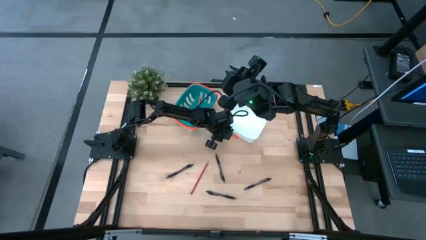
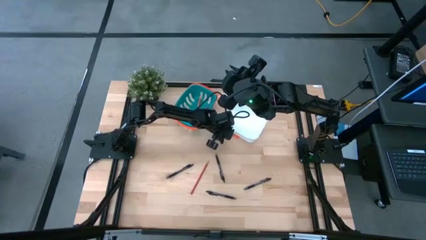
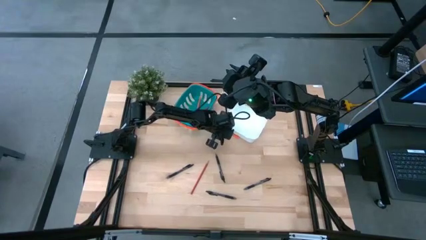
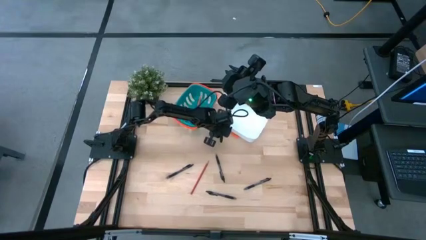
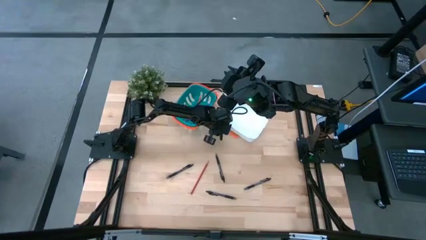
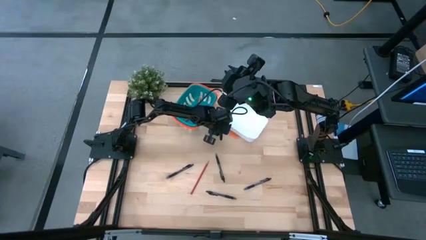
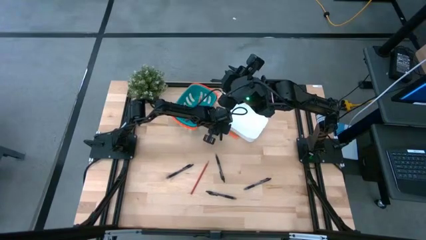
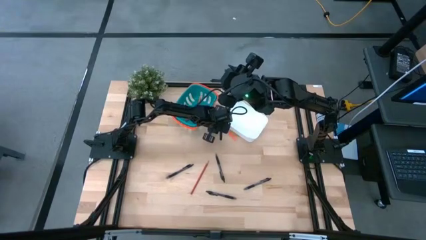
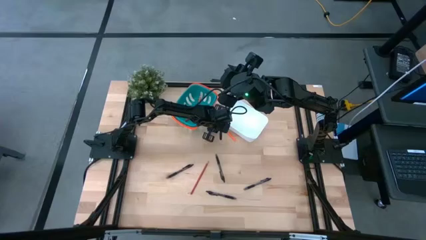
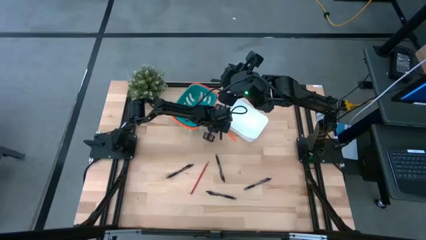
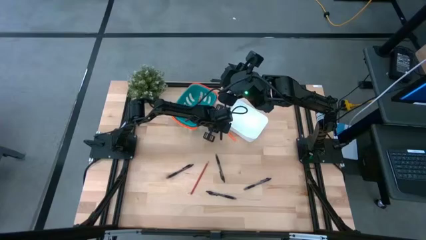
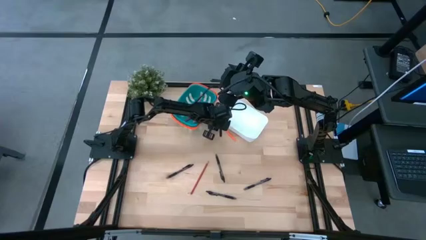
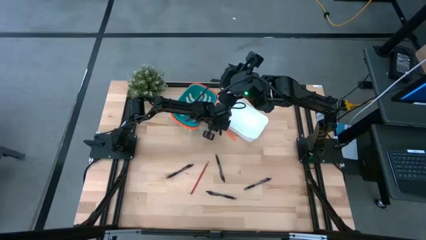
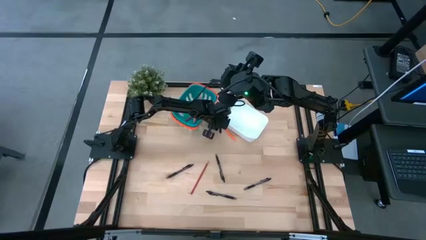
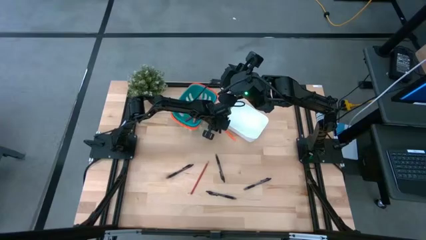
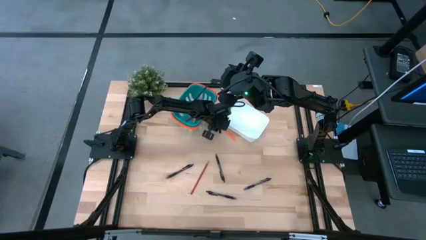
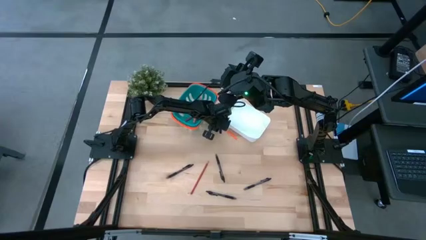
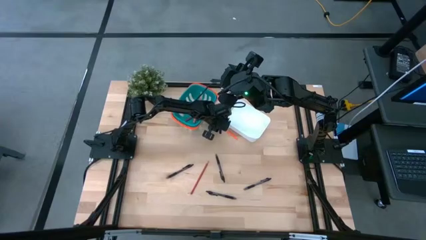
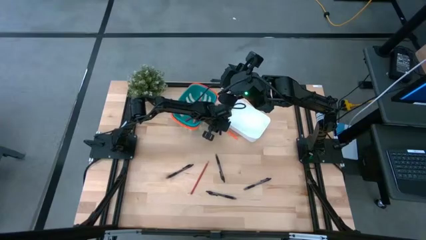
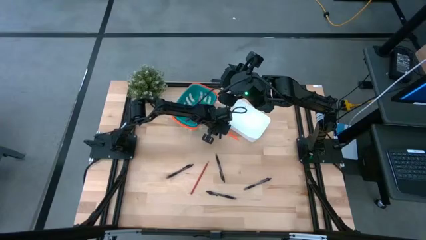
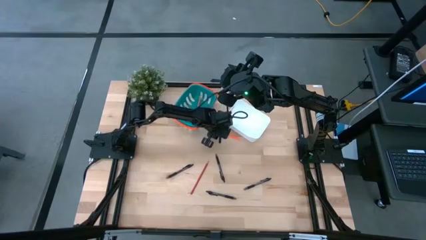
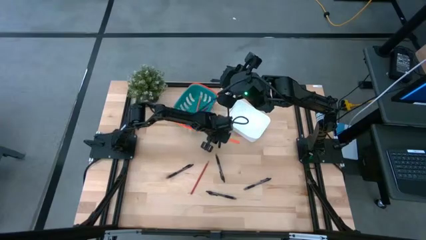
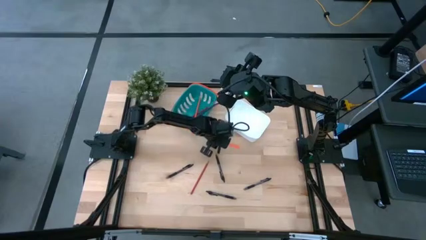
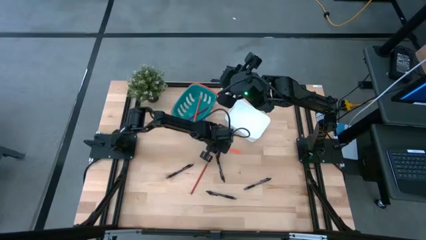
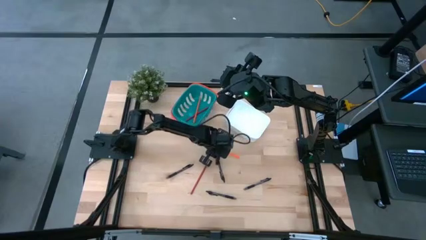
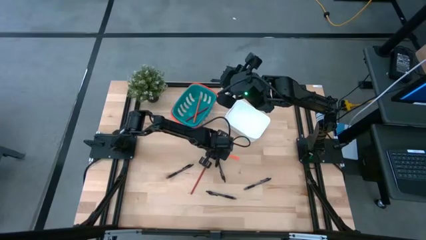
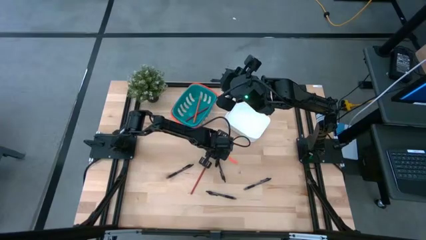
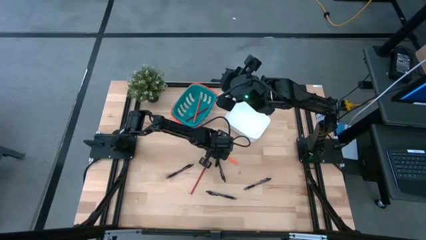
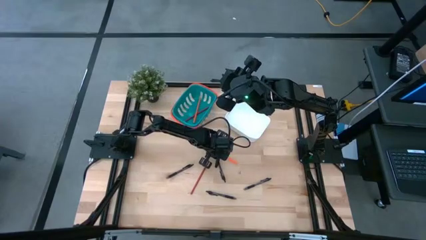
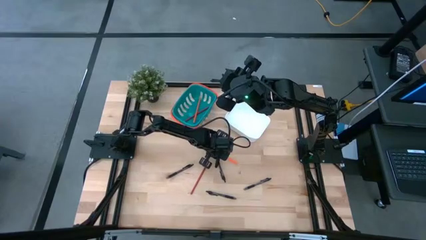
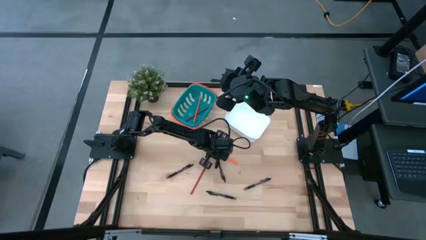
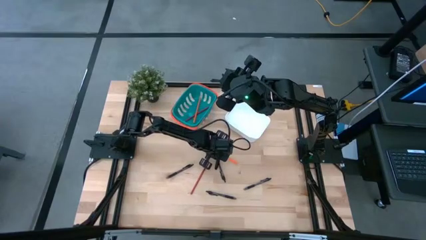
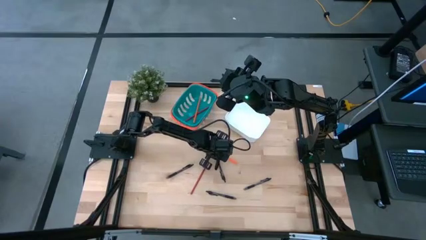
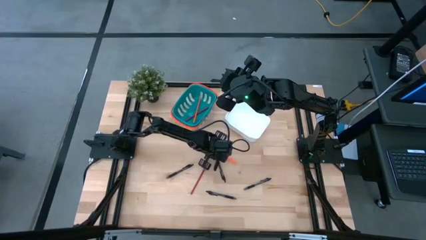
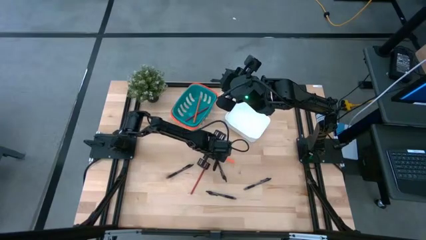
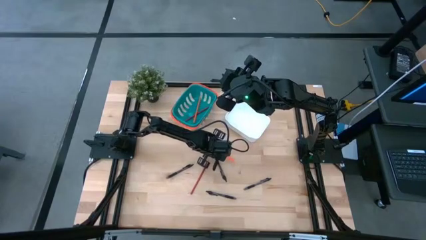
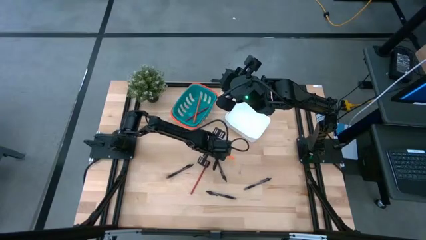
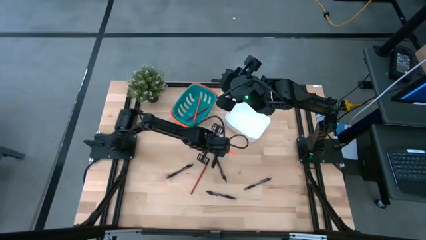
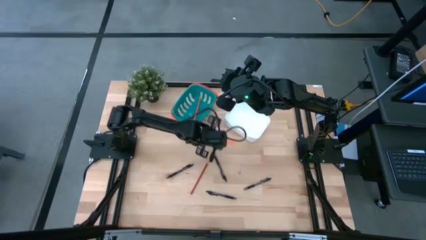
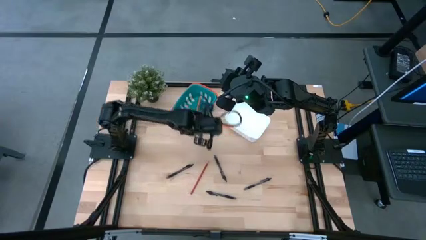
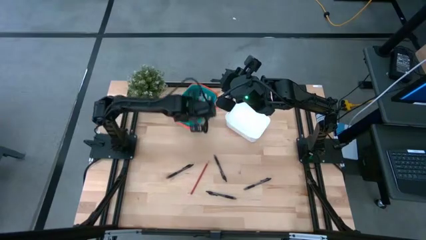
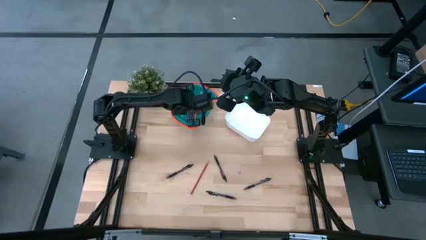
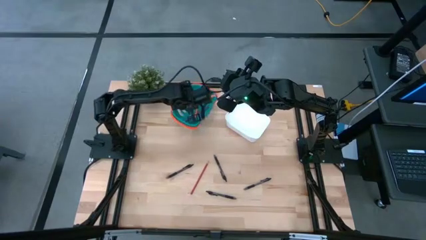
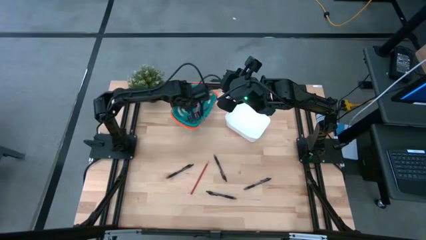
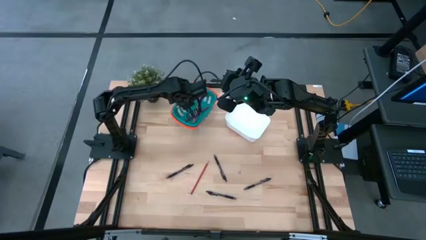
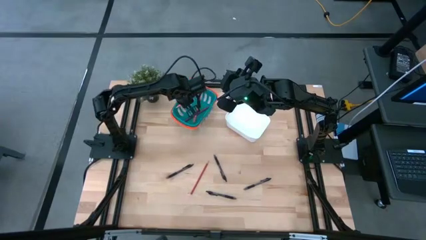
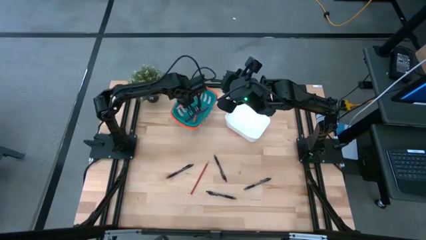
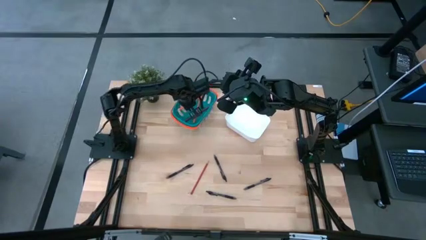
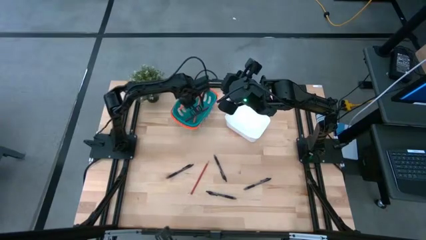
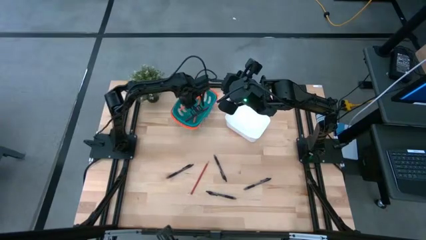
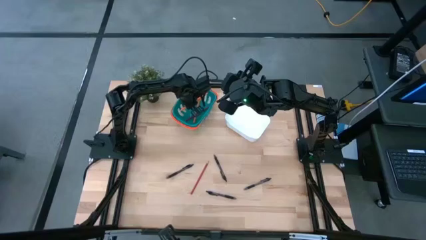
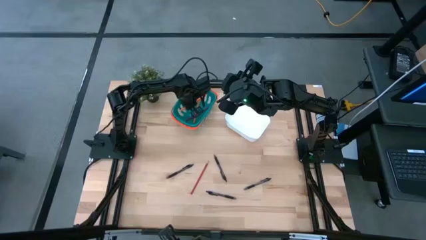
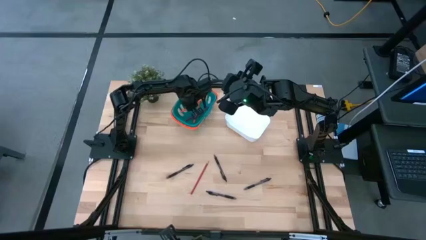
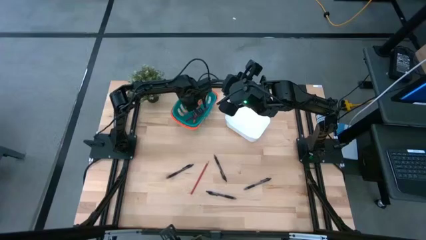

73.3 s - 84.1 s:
Task: Sort pens & pencils
Put the orange pencil into the blue bin

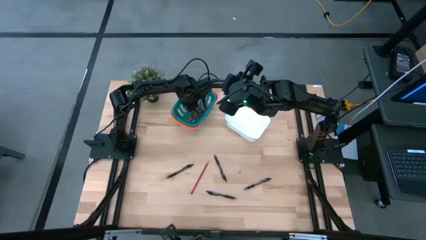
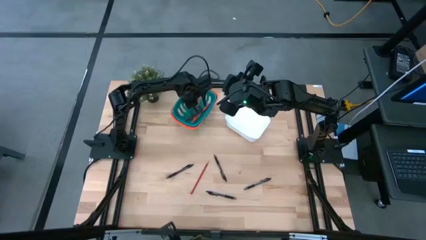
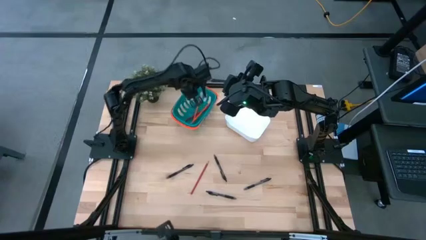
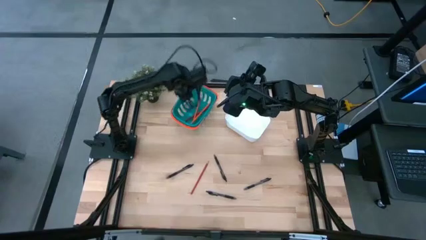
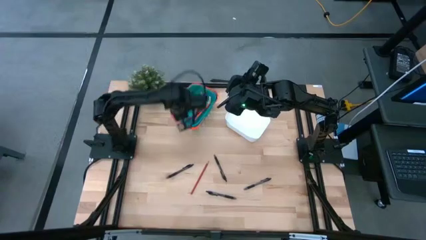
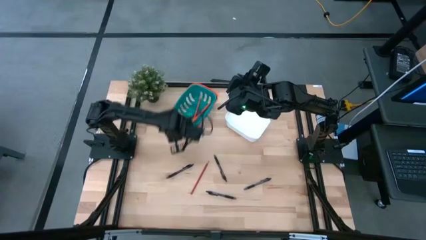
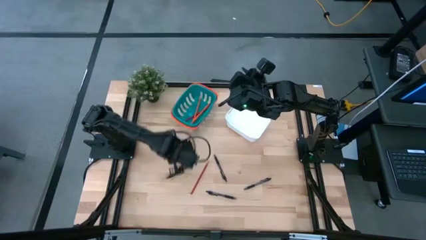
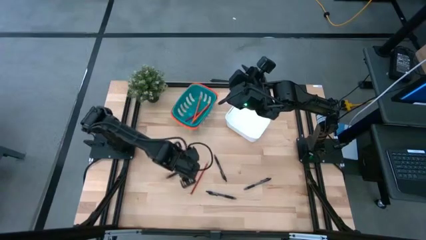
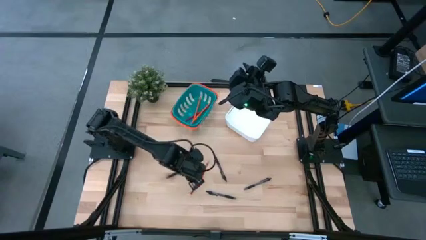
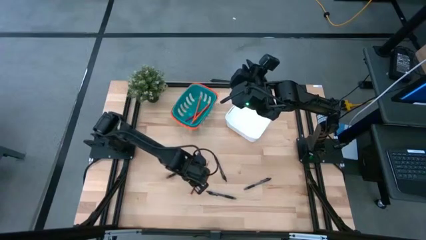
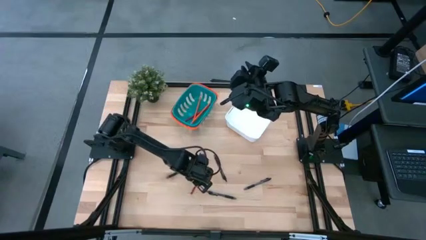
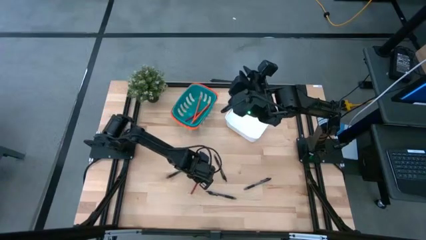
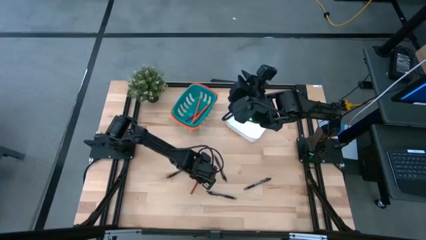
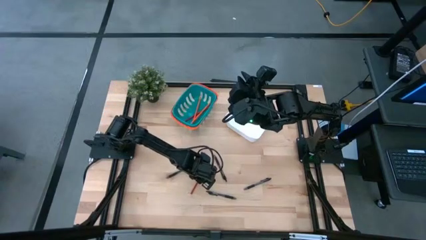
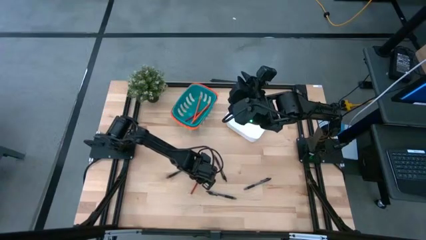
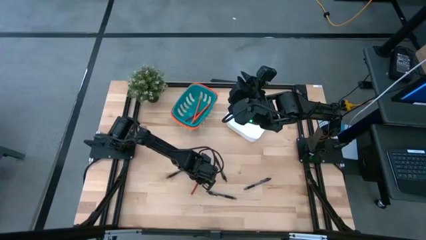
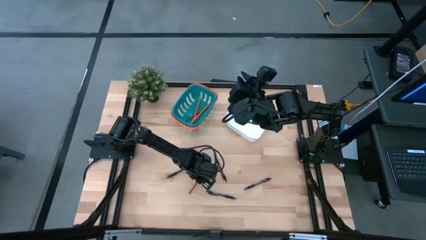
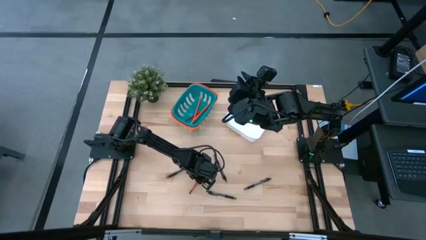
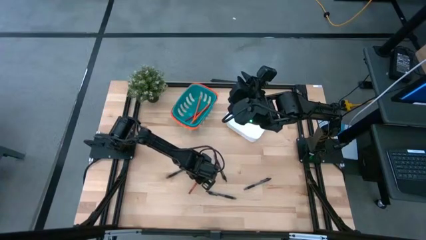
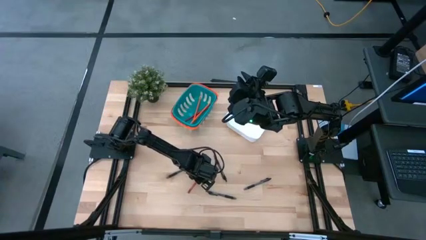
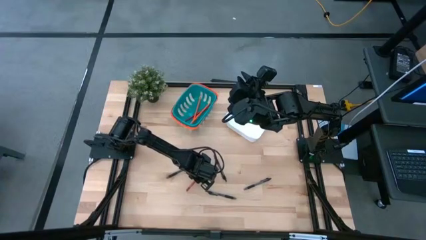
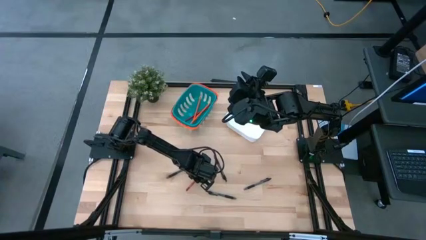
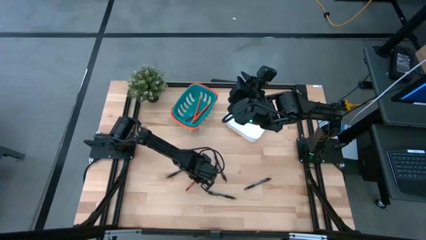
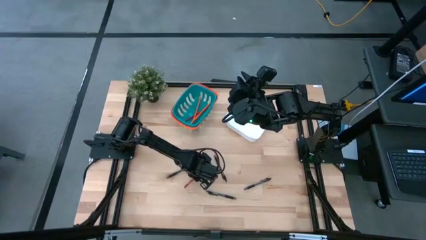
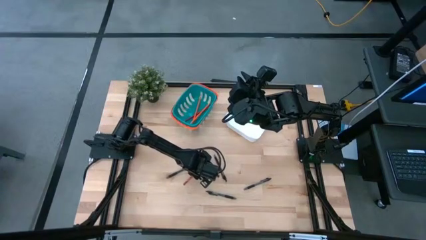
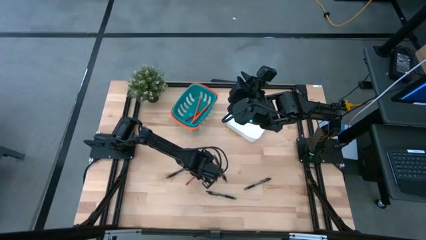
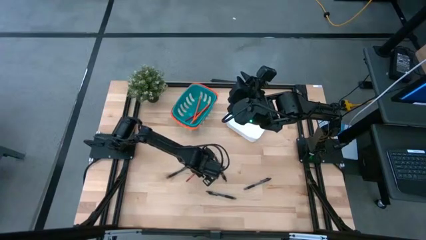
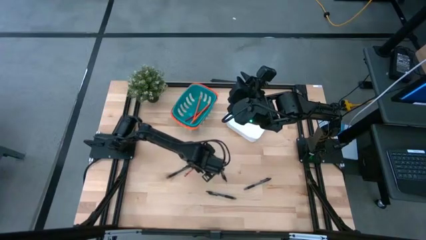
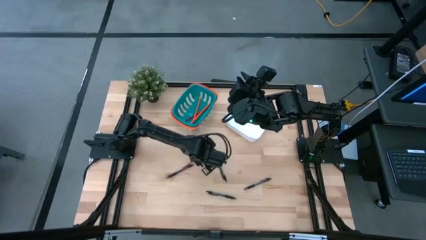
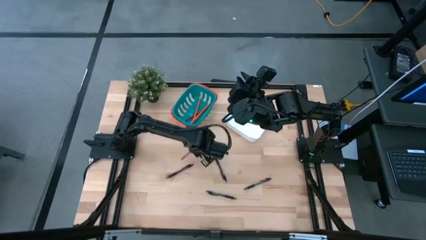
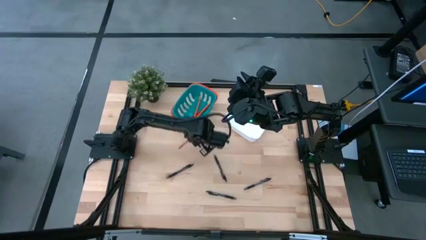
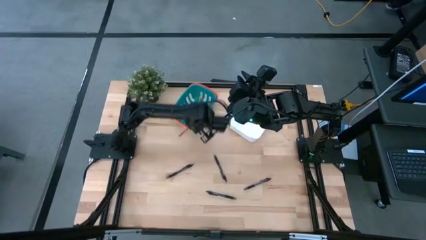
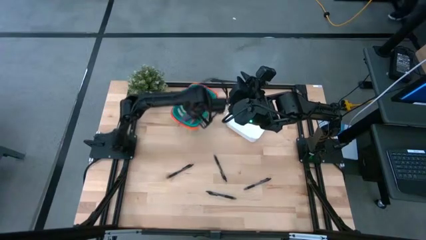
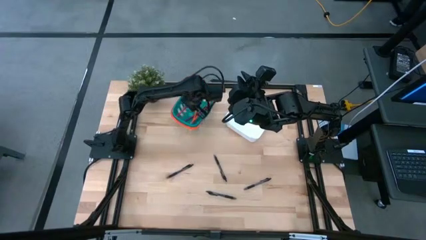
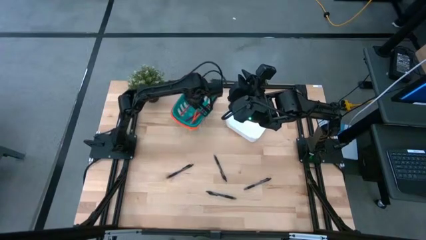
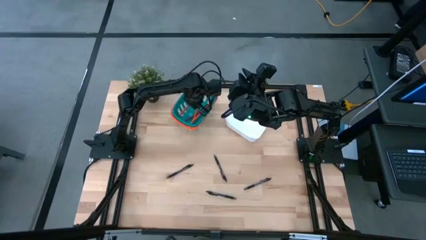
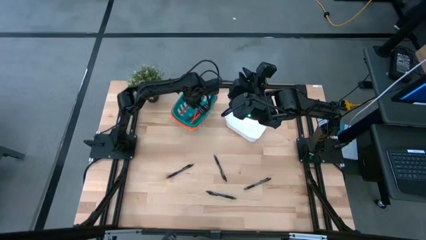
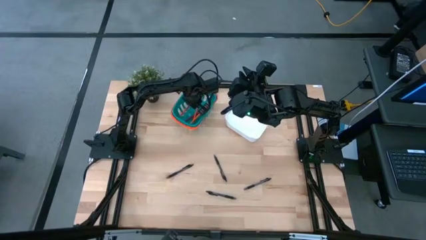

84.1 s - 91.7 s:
Put the red pencil into the blue bin
